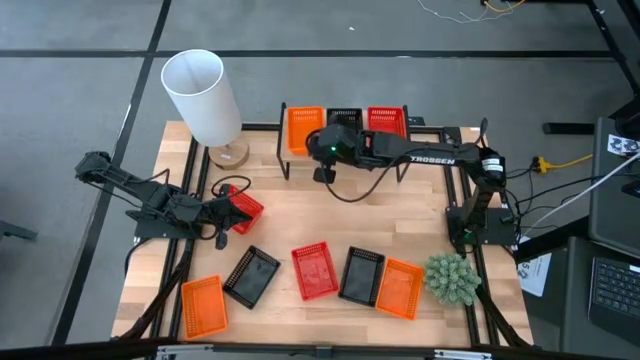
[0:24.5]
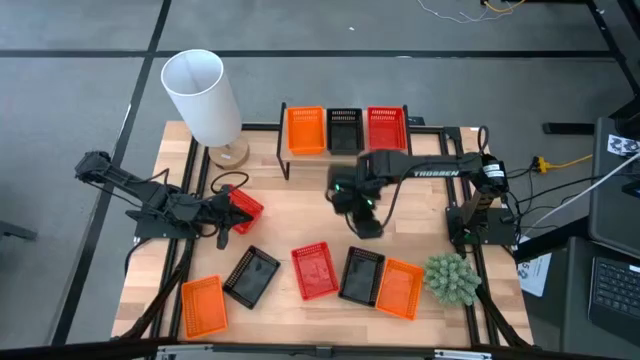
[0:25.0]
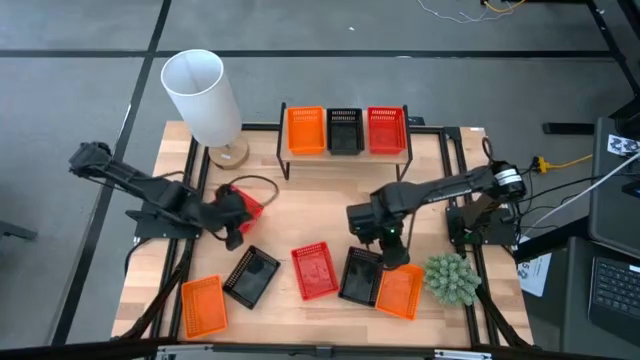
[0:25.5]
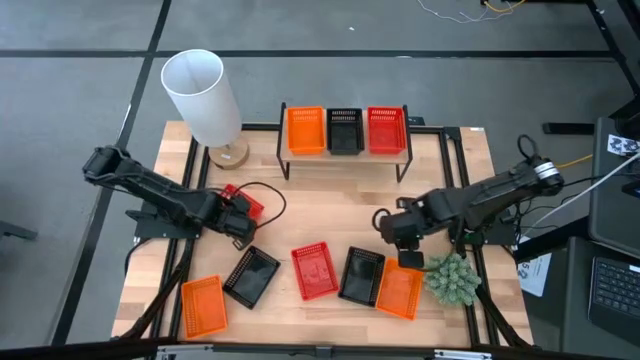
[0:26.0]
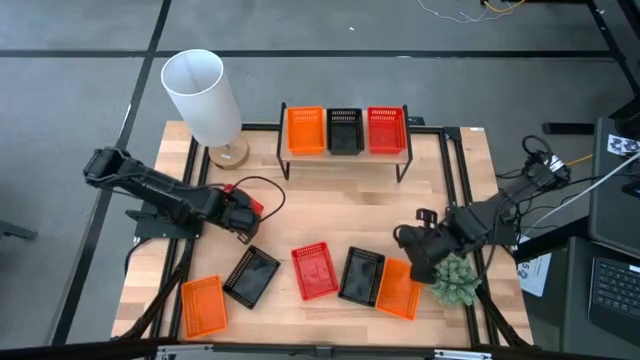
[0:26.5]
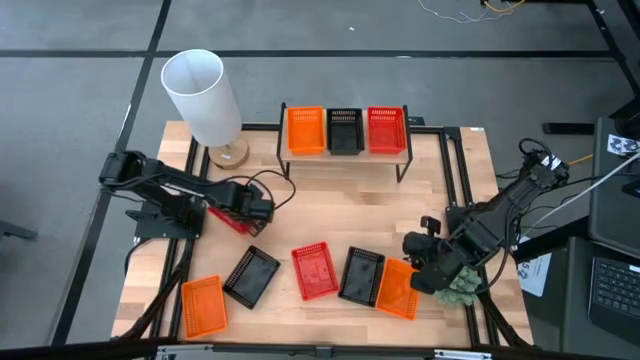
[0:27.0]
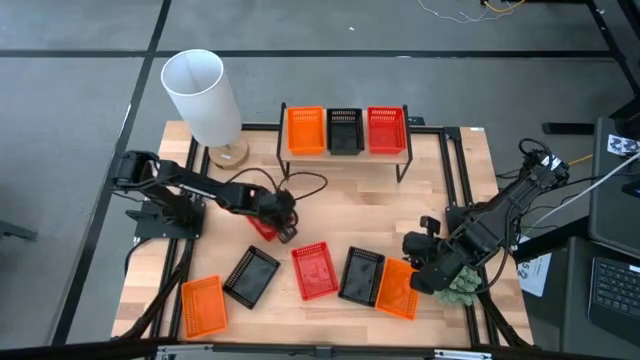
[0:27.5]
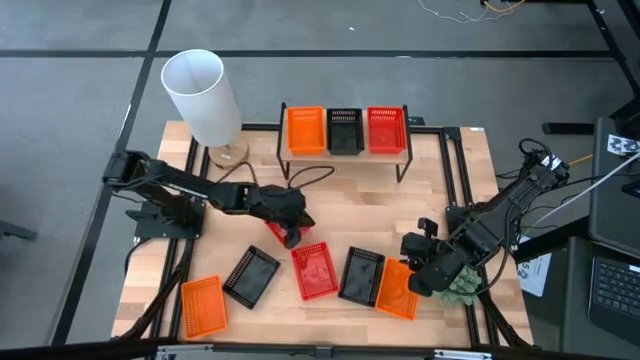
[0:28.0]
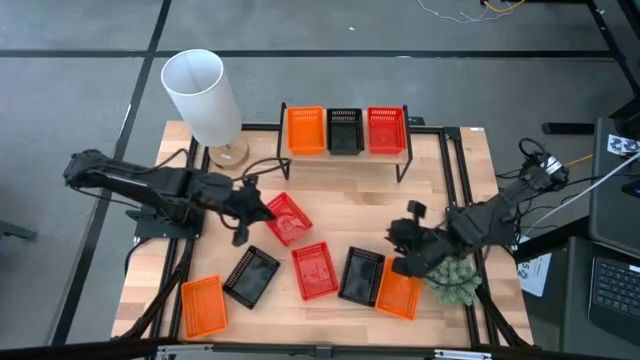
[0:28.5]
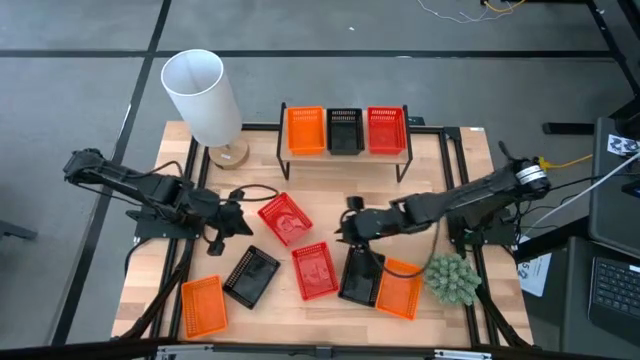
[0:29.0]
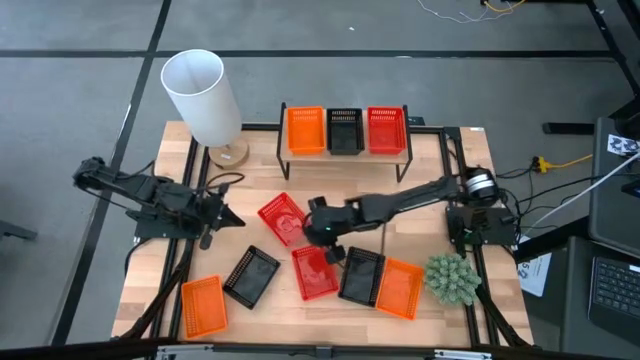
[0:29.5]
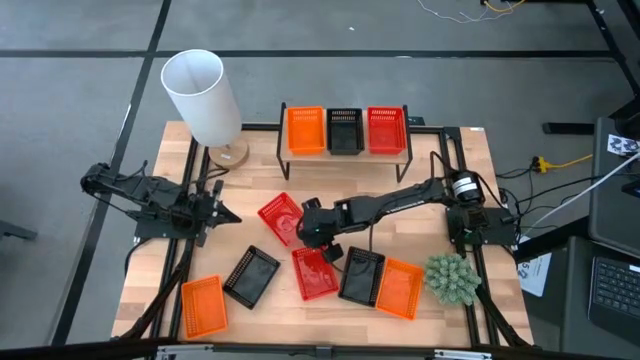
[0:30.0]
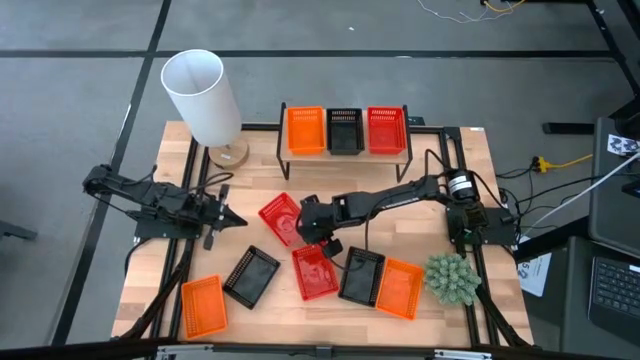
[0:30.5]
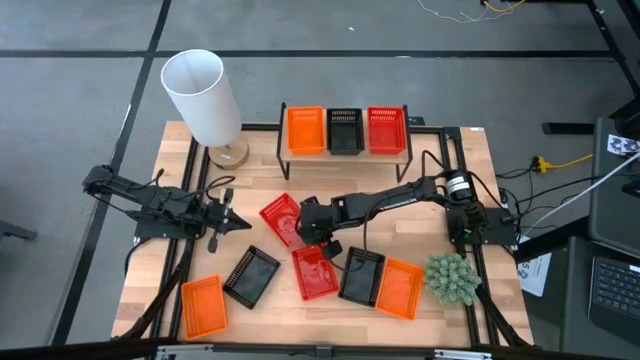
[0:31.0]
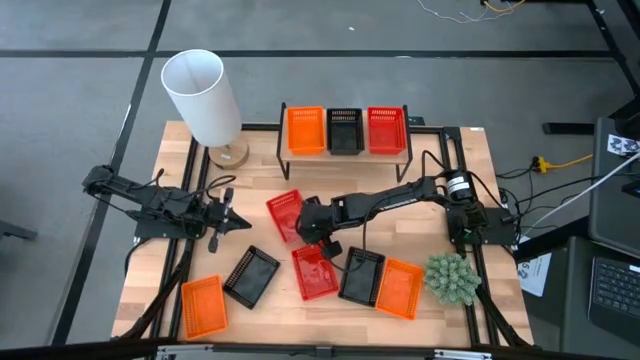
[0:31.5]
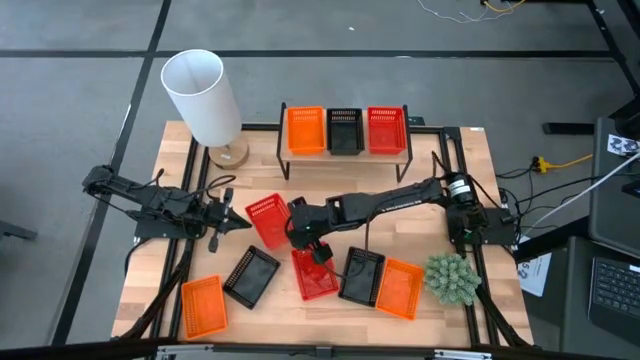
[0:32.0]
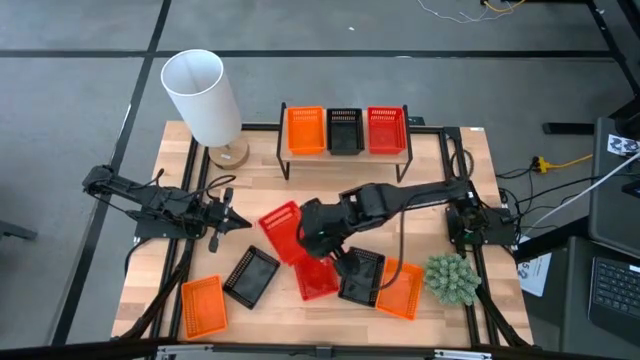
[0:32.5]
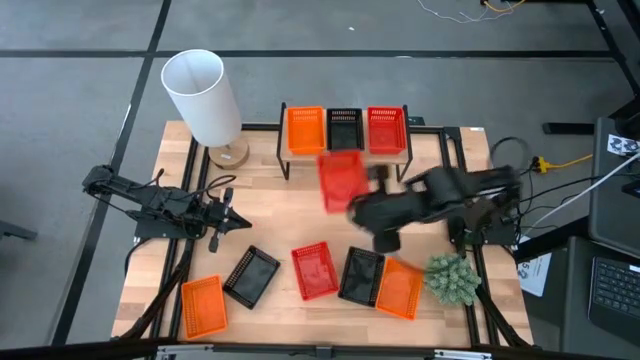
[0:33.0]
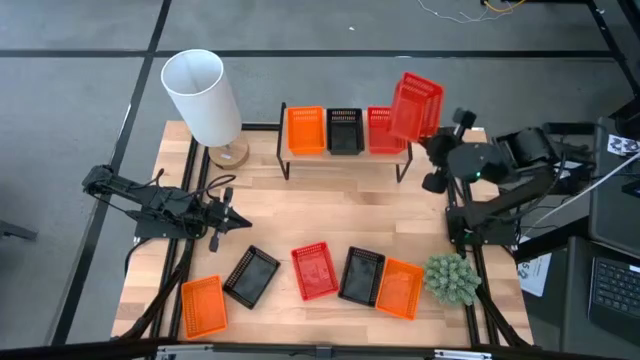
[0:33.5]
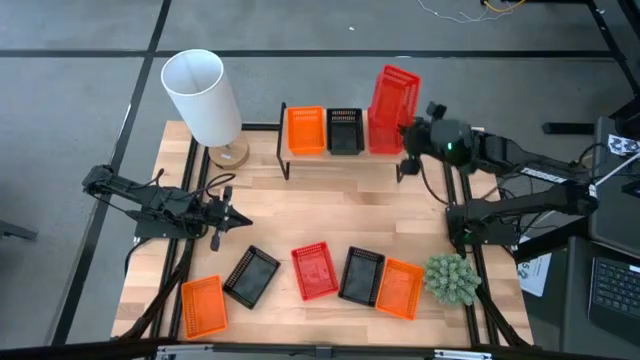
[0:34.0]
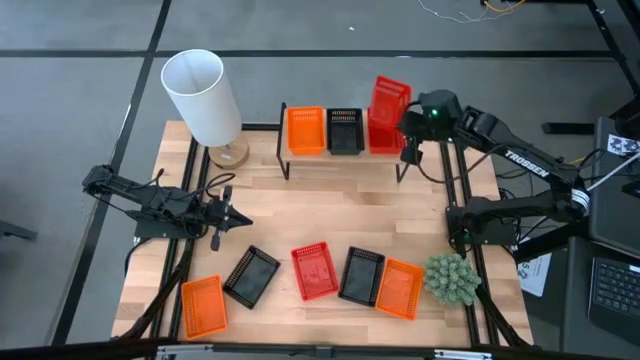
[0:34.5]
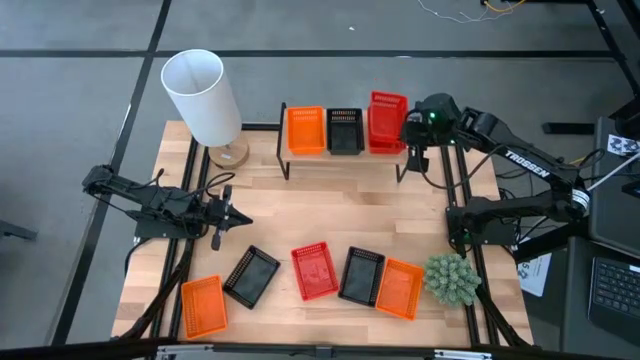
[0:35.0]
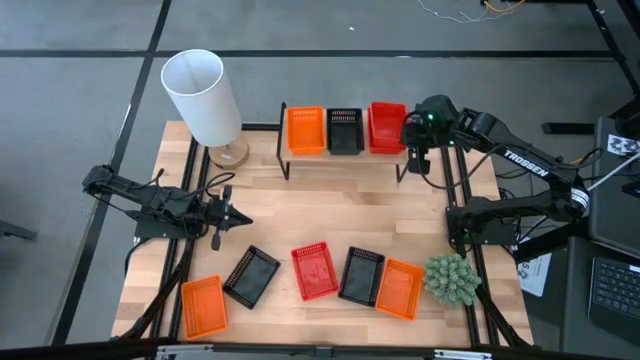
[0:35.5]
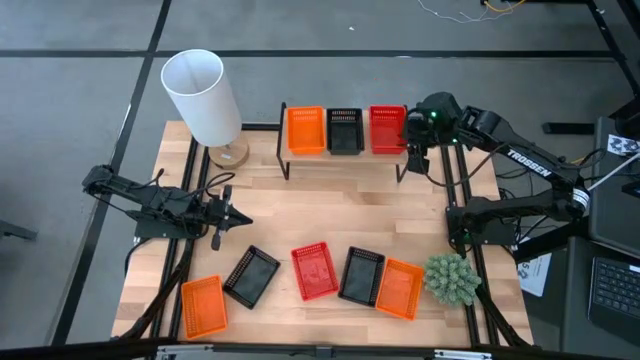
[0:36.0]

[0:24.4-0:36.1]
Task: Stack baskets on shelf by color
Stack the left red basket on the red basket on the top shelf

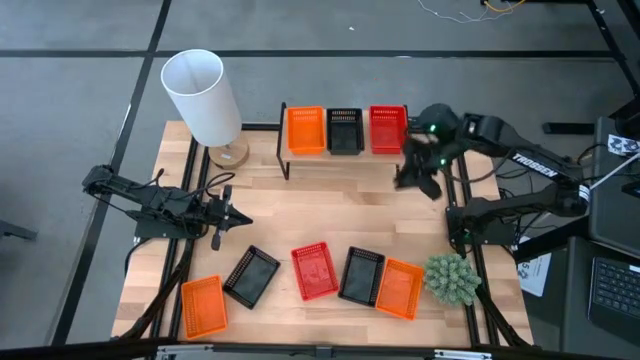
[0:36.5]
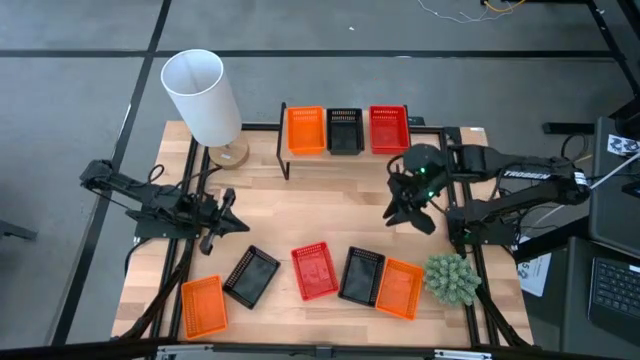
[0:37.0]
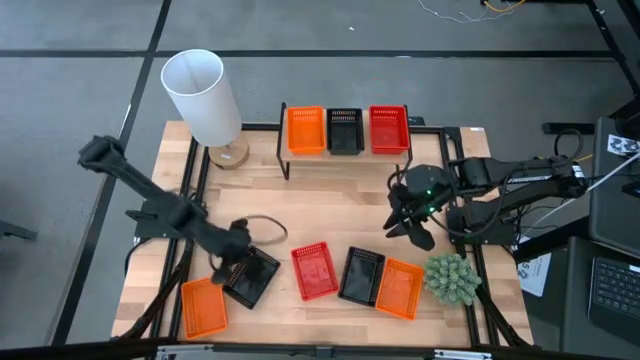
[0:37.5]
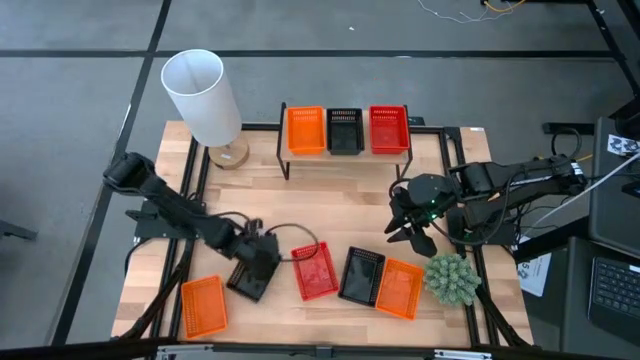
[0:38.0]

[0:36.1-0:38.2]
Move the black basket to the center of the table

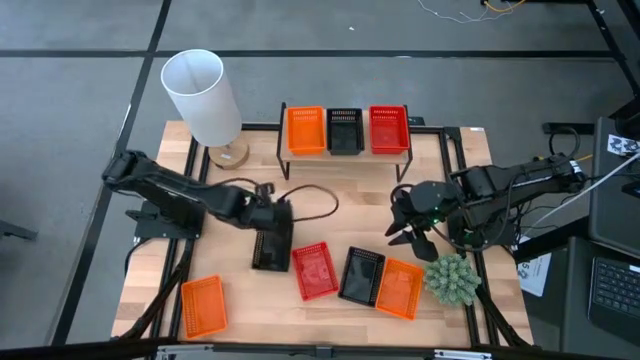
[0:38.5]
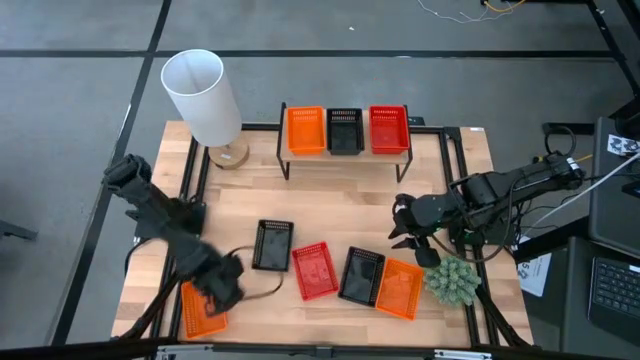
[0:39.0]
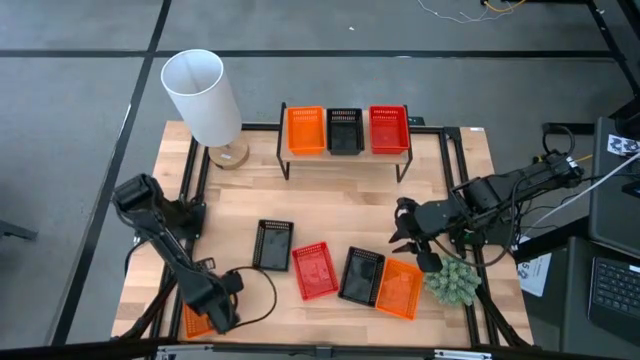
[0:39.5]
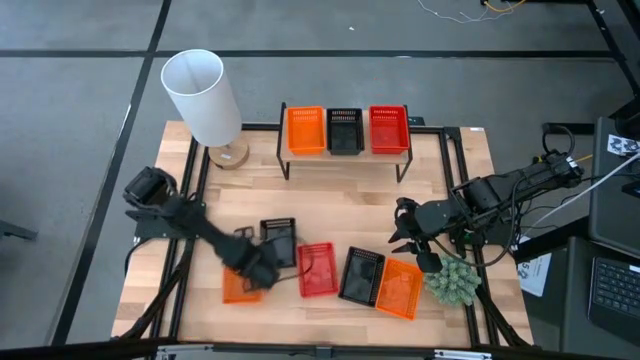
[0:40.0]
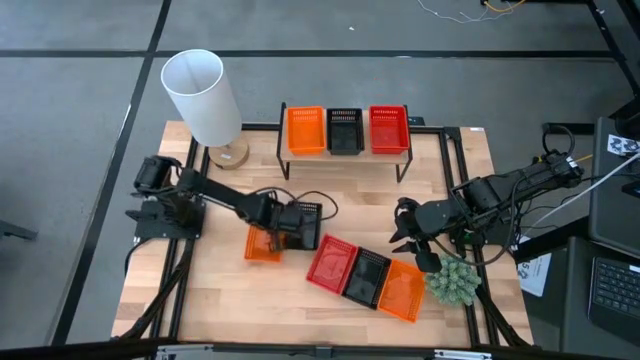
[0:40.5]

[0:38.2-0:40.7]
Move the orange basket to the middle-left of the table

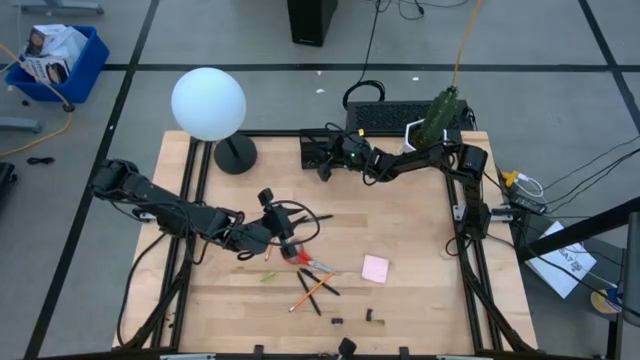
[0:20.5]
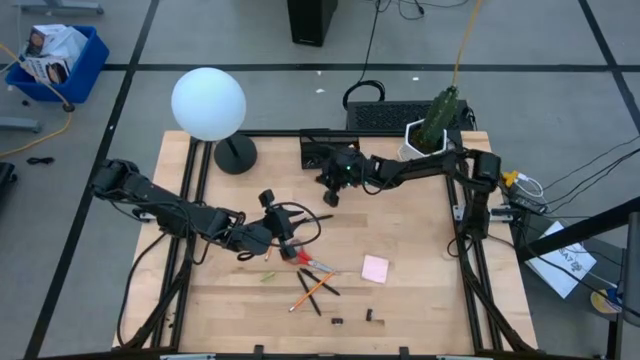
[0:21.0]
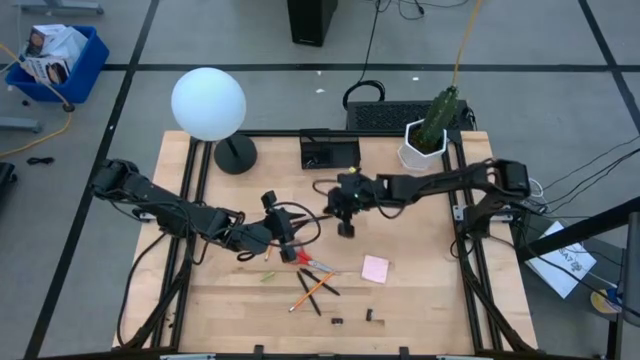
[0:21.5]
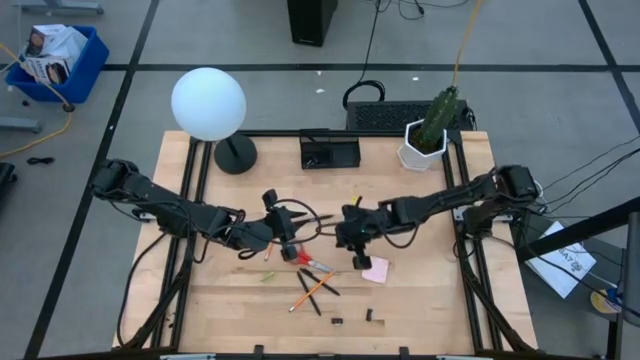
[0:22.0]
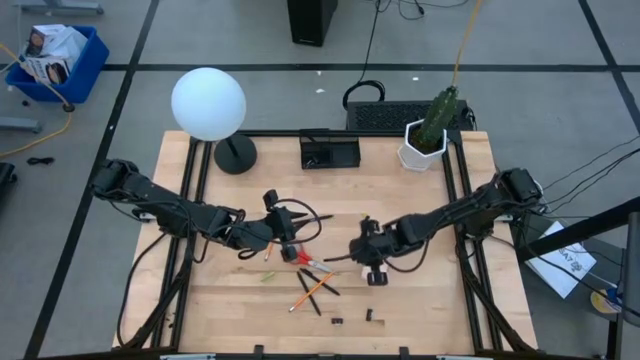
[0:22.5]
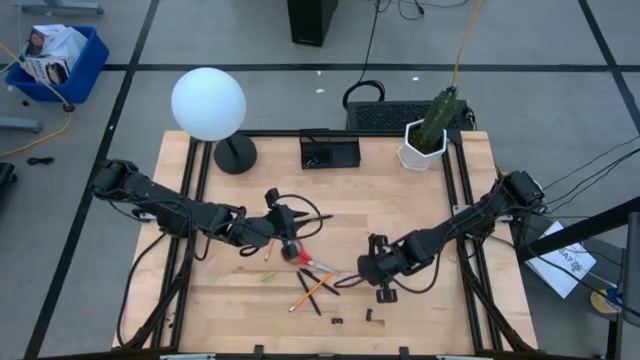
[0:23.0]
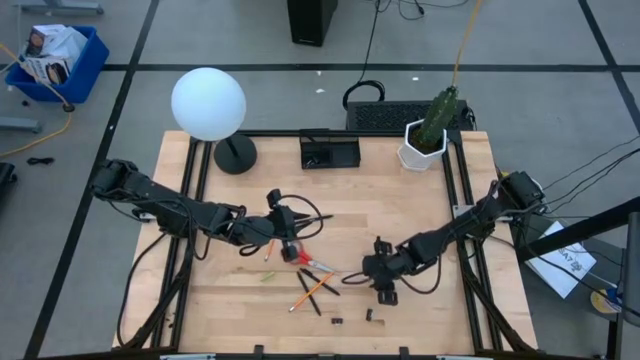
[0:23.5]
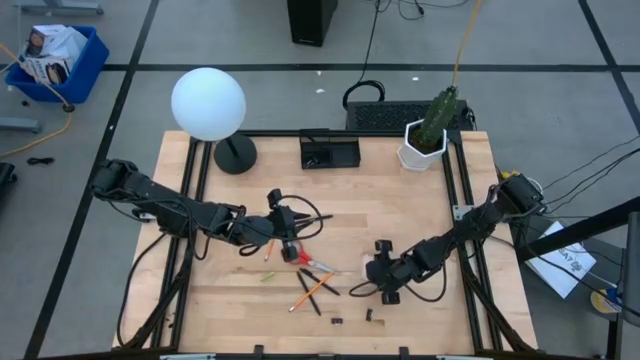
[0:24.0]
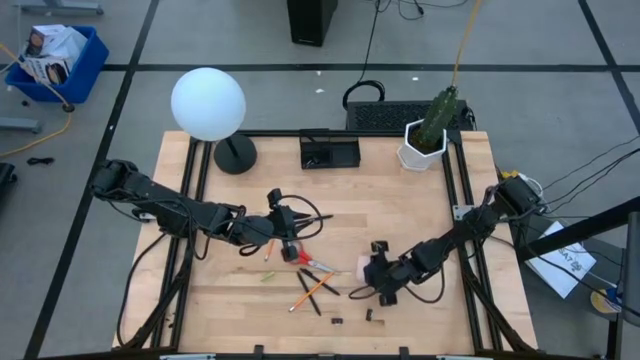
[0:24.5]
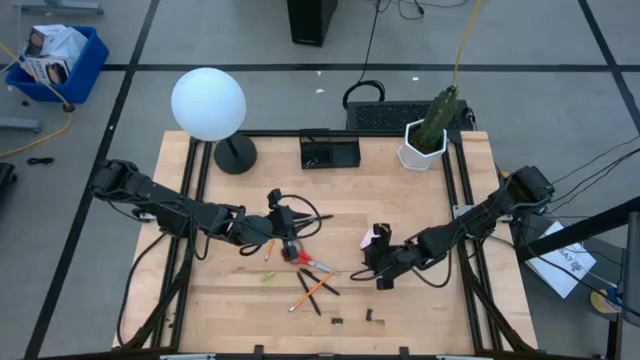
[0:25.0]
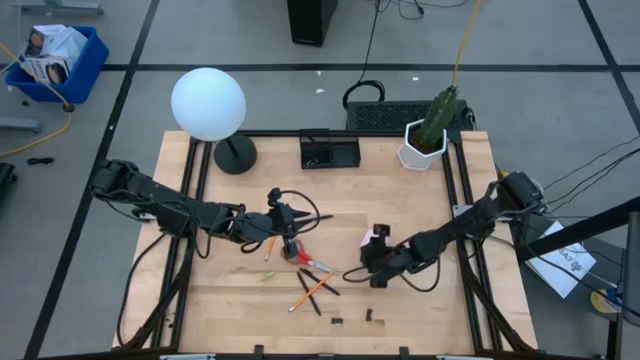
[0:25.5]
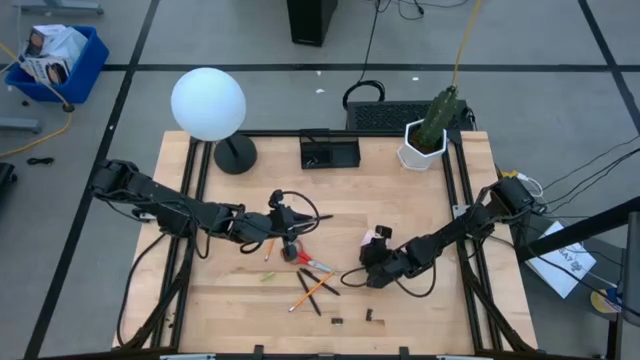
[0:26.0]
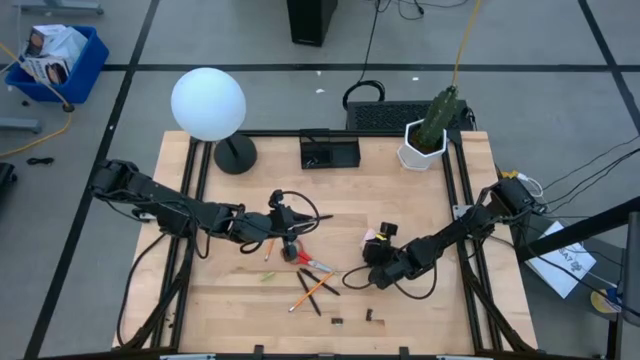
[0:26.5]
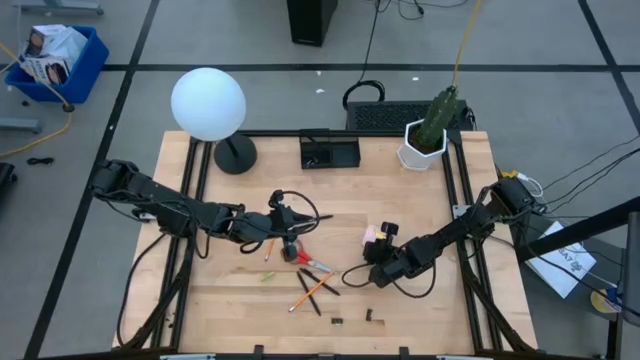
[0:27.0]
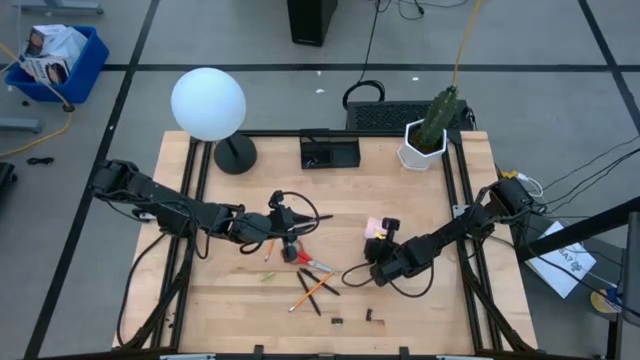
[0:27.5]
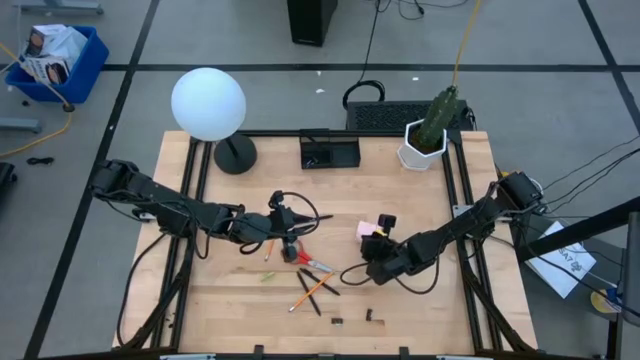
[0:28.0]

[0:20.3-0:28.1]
Task: Pick and place office supplies into organizer
Put the sticky note into the desk organizer
